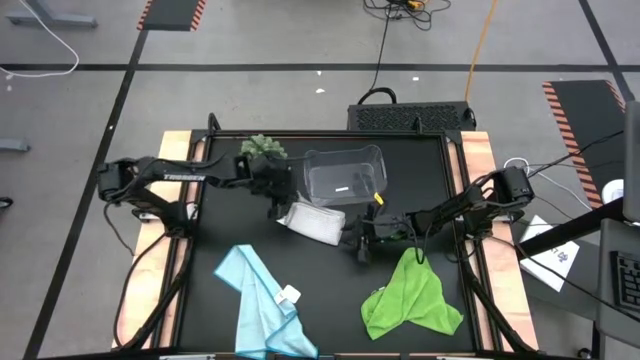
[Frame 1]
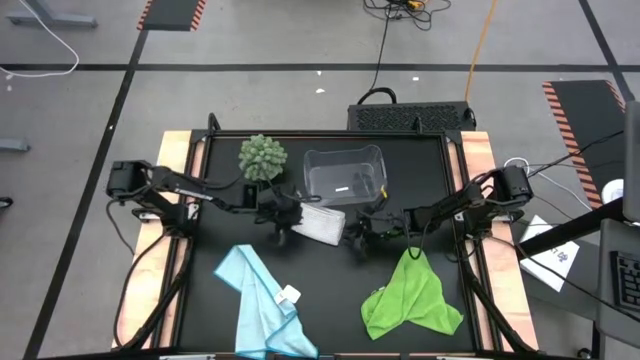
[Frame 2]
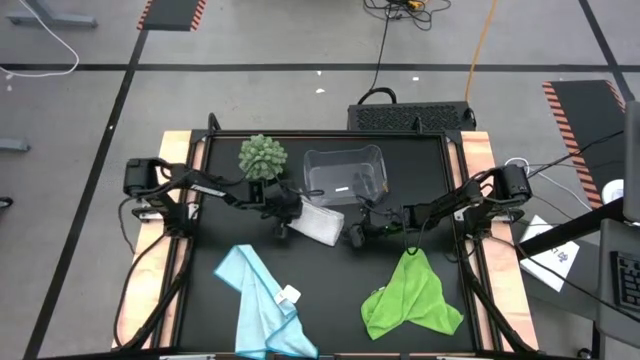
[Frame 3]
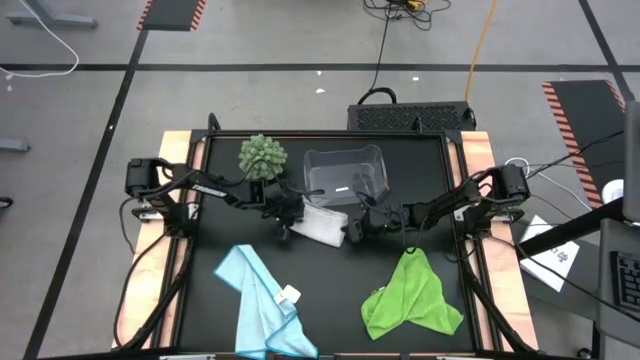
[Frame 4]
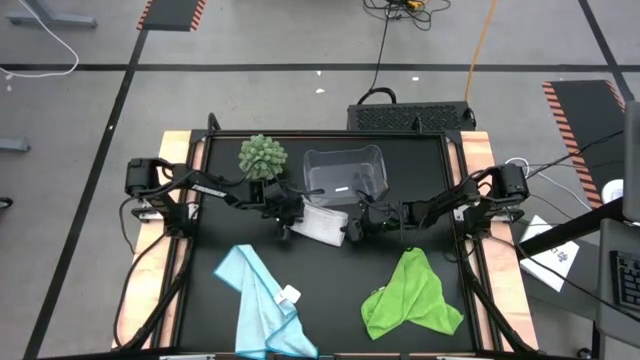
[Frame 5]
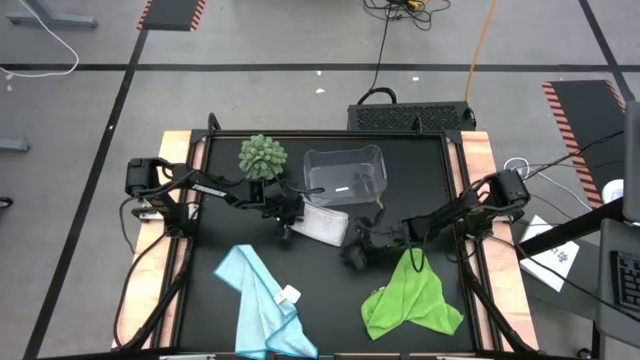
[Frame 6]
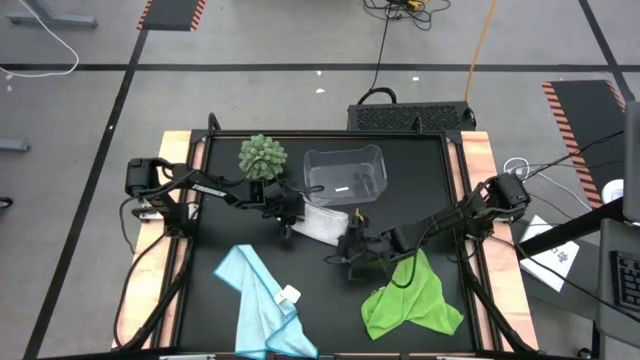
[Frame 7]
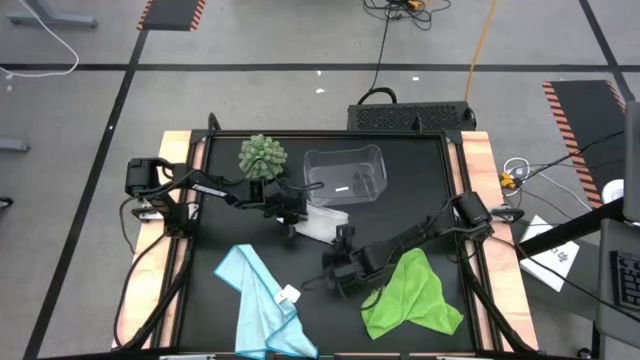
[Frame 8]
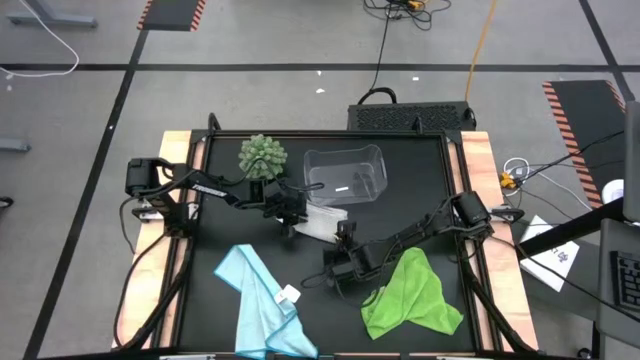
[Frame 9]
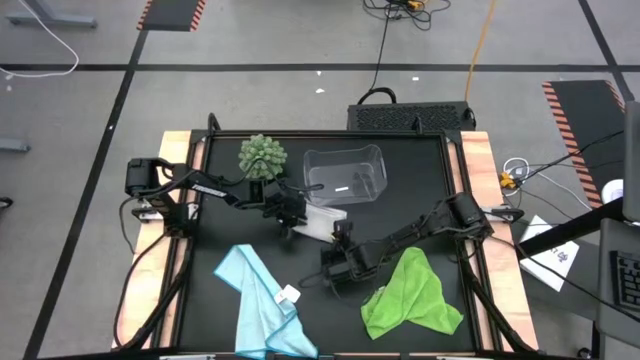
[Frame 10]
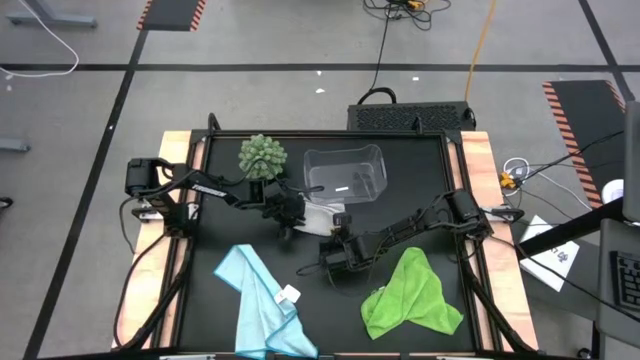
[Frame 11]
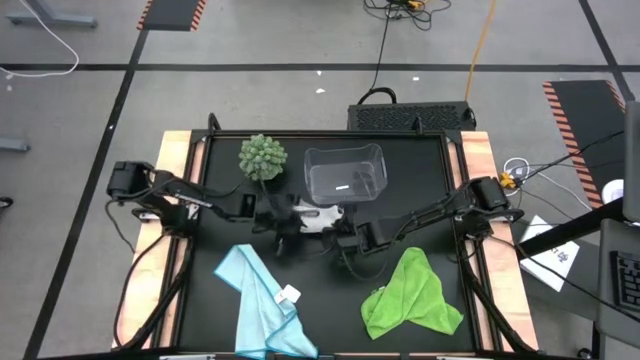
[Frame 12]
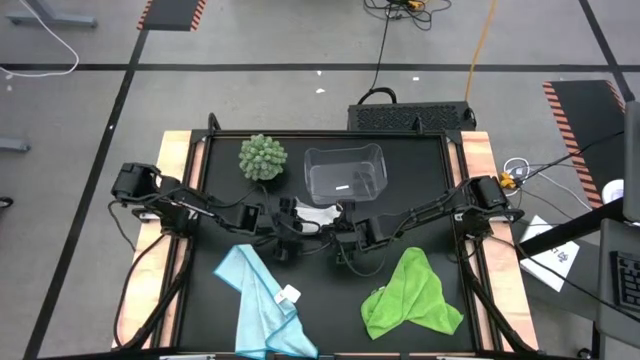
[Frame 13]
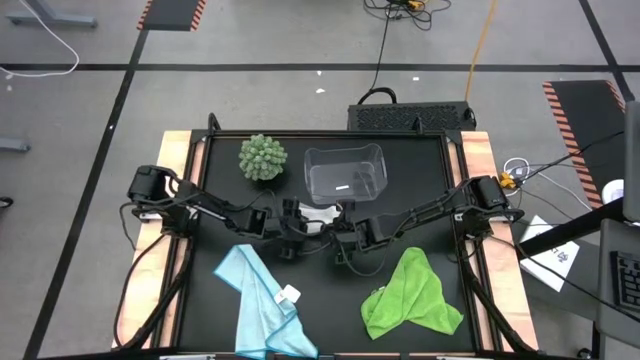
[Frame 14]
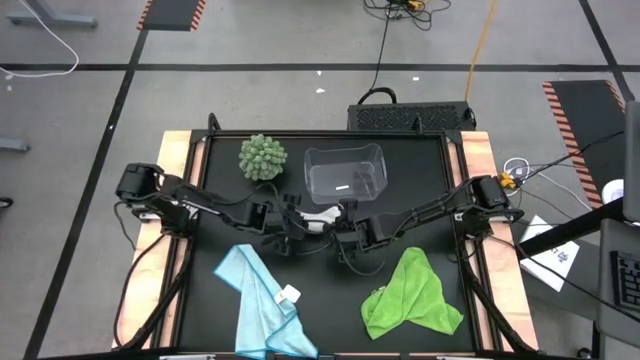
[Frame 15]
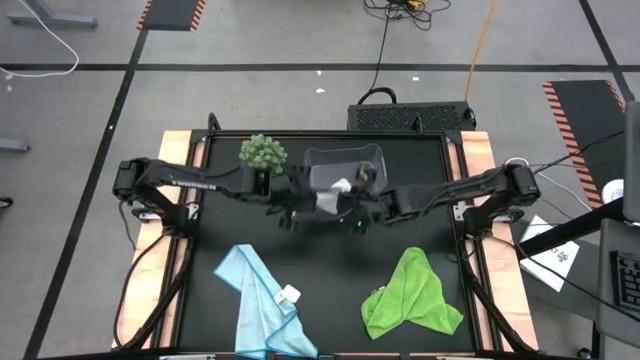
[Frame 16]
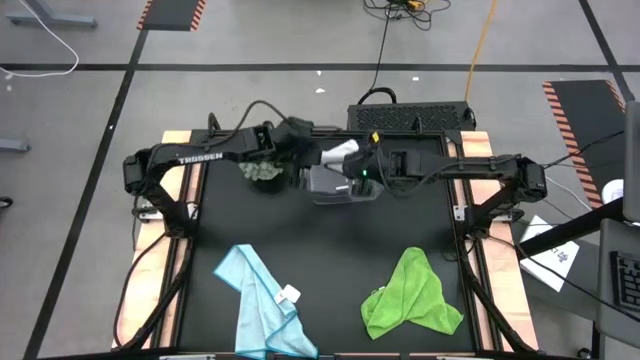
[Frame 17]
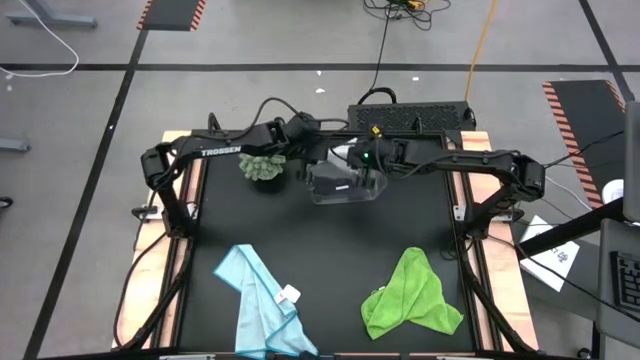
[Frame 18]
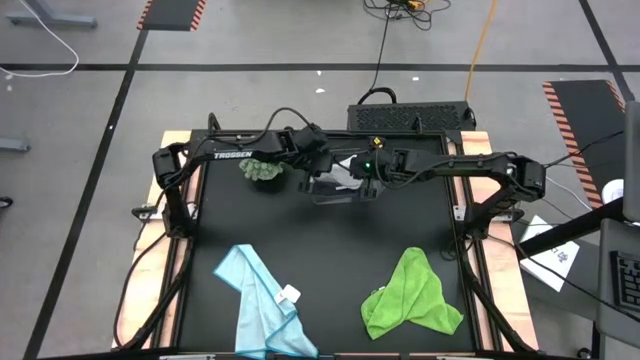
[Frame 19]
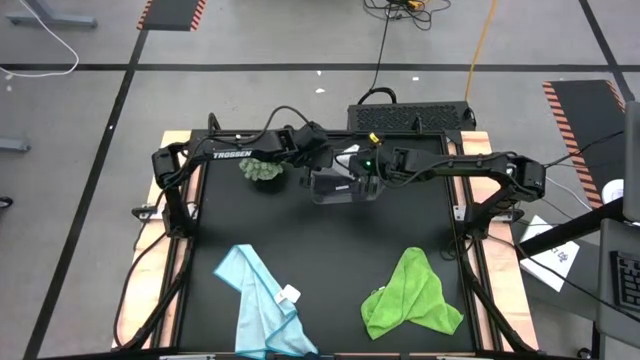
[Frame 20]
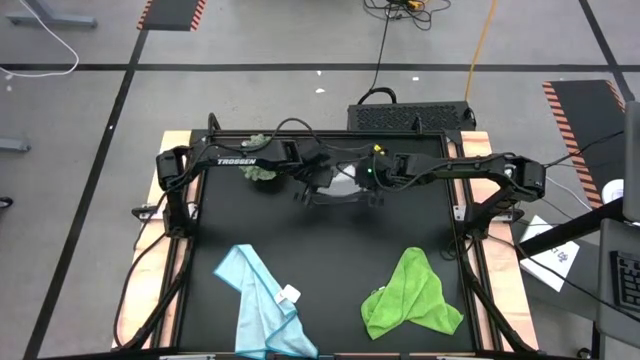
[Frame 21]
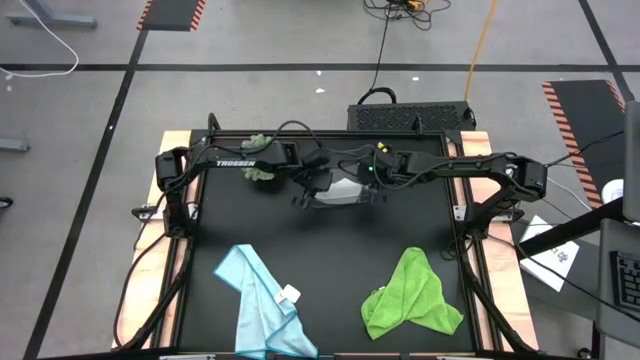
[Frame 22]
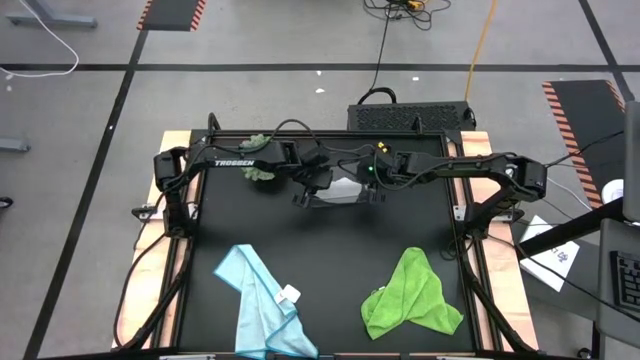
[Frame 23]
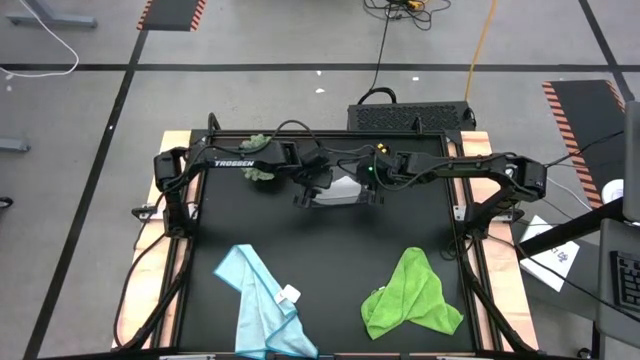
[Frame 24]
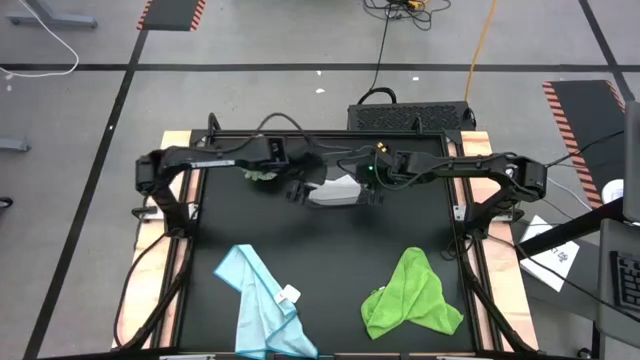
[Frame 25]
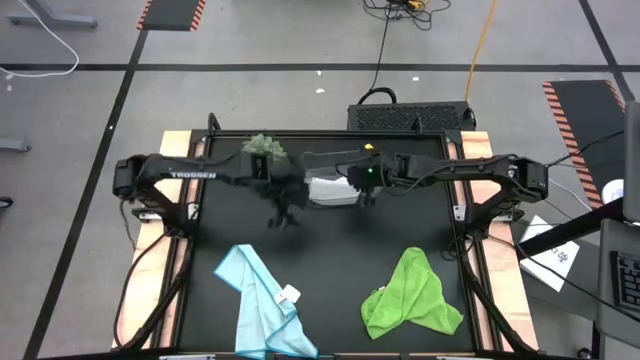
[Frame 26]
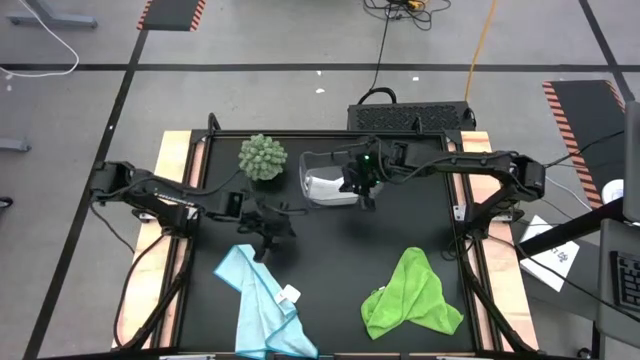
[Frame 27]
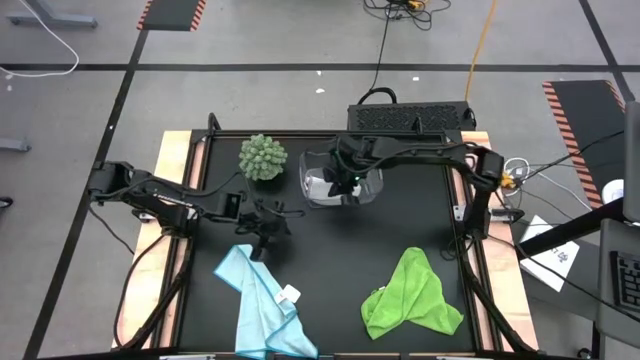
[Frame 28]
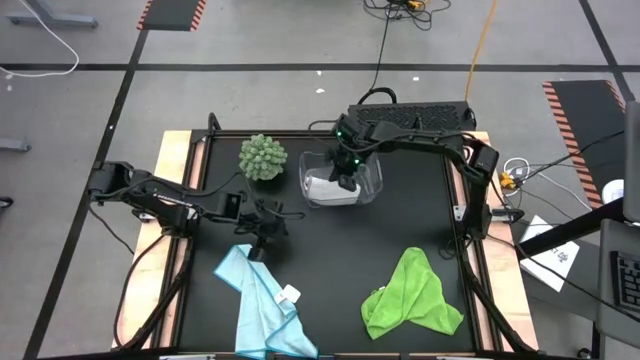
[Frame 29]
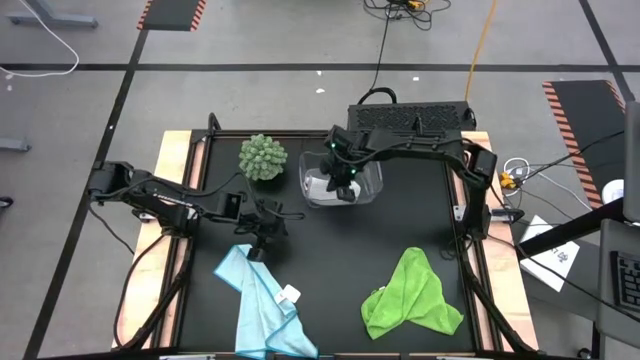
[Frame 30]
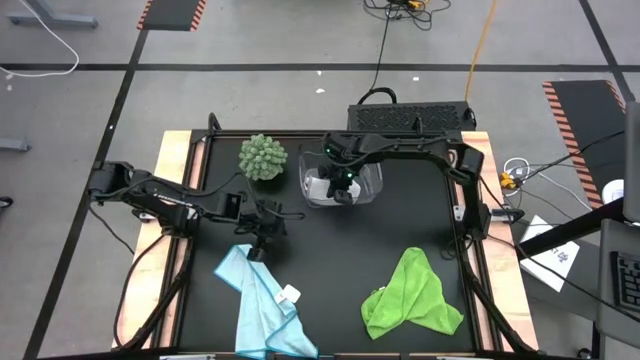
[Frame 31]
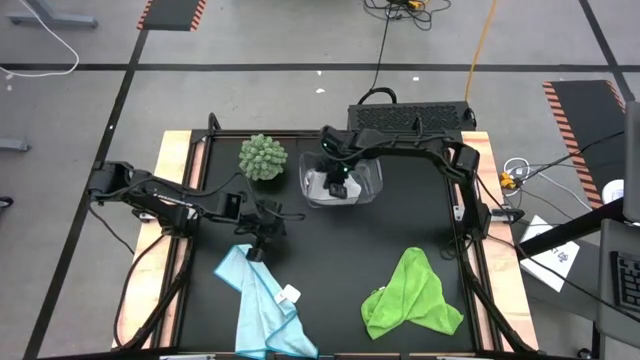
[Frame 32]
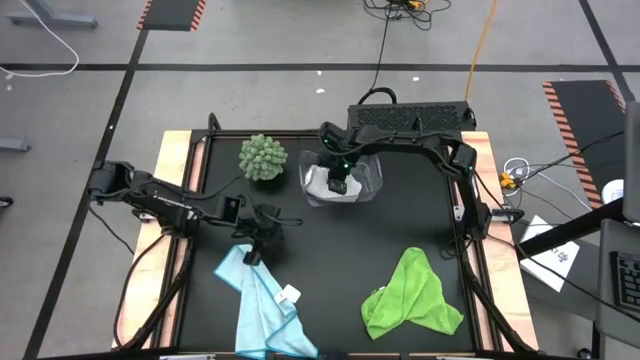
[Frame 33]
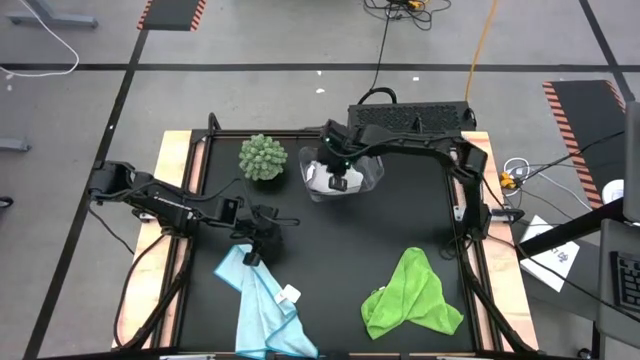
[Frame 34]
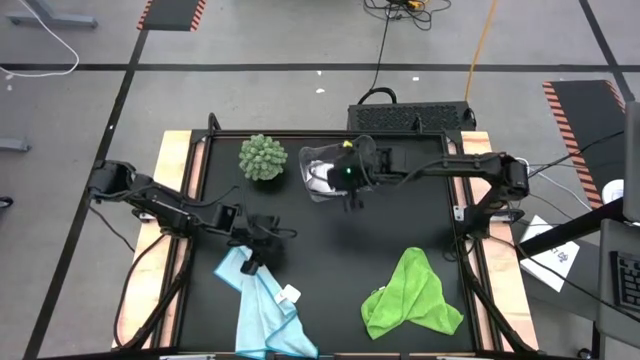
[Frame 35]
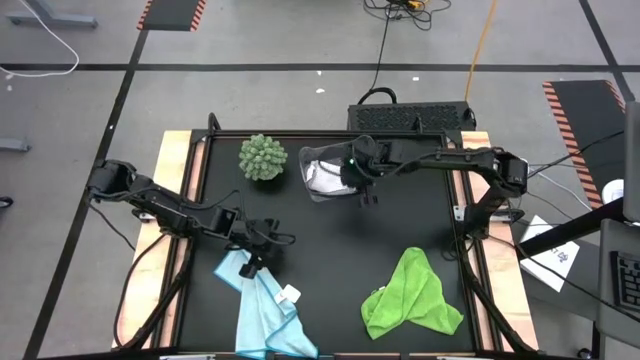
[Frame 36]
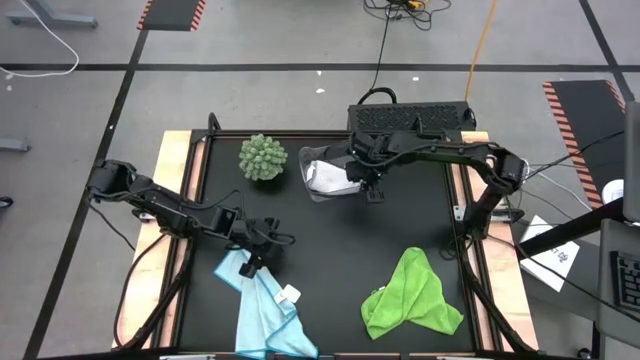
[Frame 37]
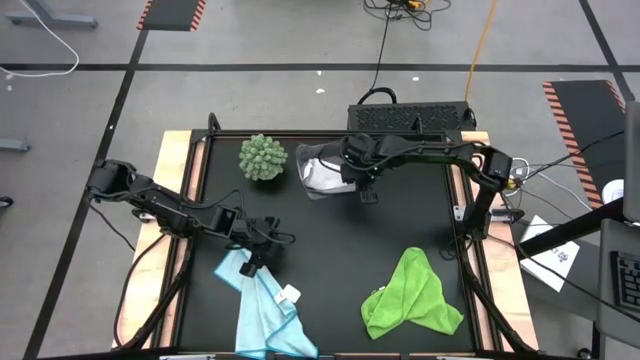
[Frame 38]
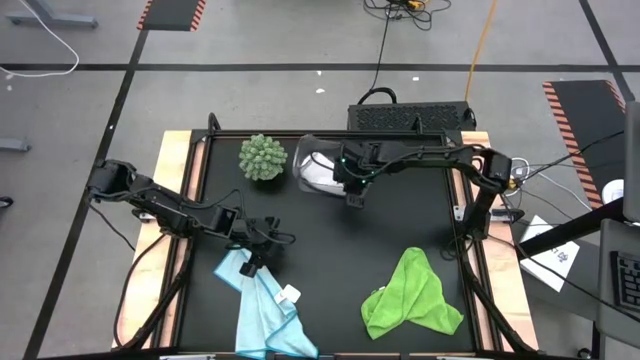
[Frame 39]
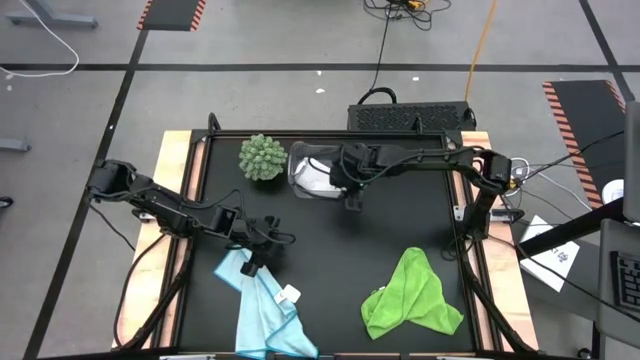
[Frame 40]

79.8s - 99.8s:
Task: Fold microfiber towels
Put the folded gray towel into the transparent bin

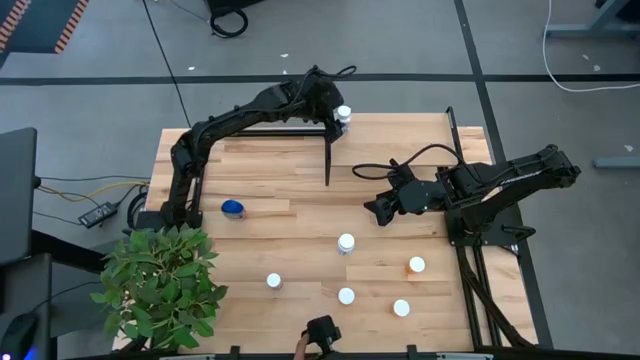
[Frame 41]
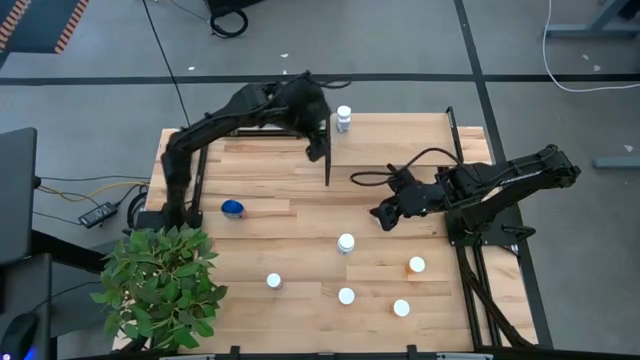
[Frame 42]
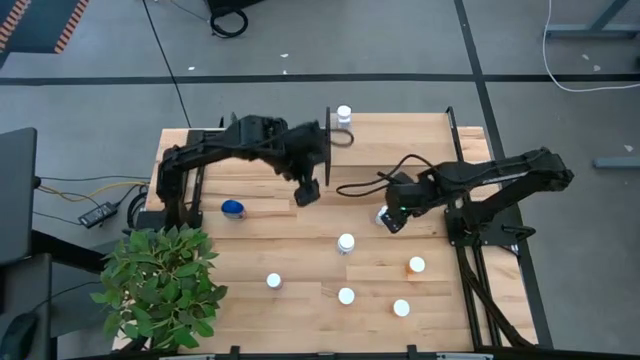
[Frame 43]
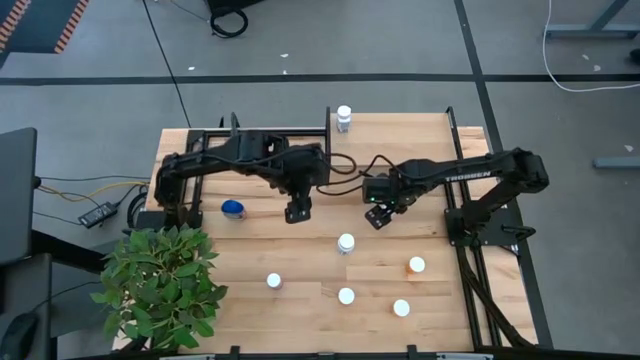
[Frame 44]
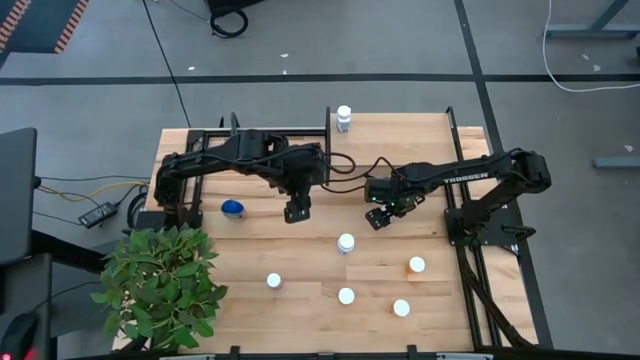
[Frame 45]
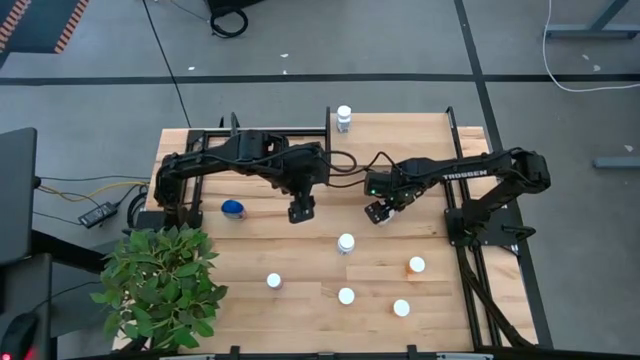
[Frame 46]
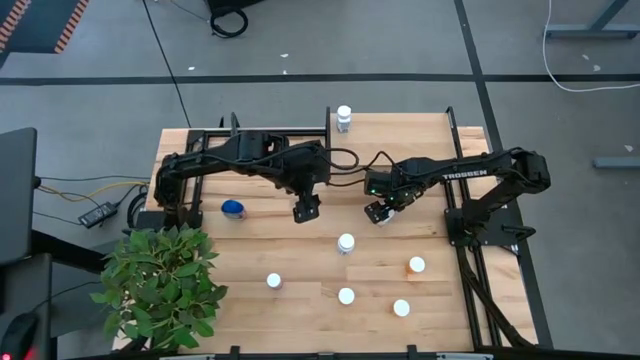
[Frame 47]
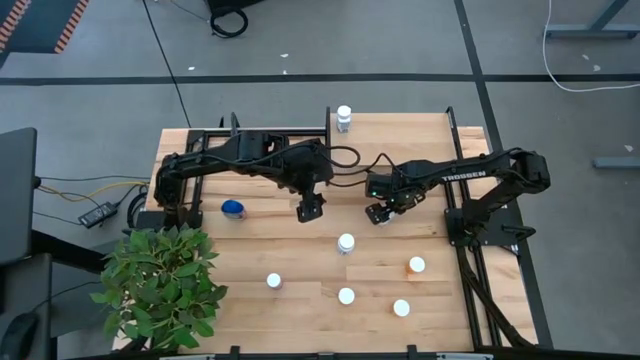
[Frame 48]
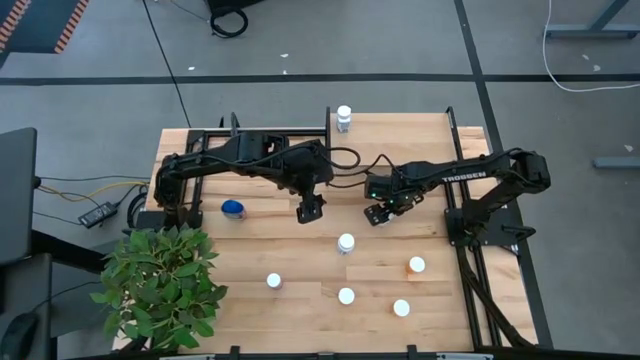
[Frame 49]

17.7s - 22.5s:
Task: Pick and place medicine bottles onto shelf by color
Put the white blue medicine bottle on the shelf
